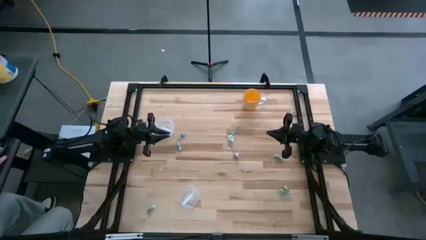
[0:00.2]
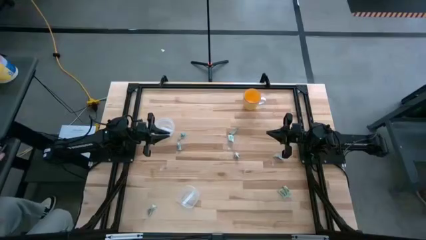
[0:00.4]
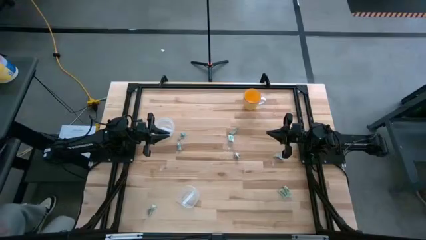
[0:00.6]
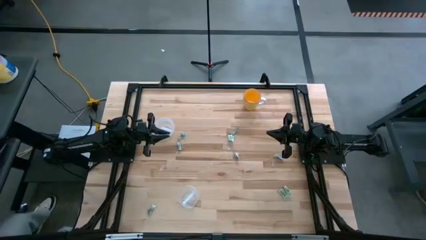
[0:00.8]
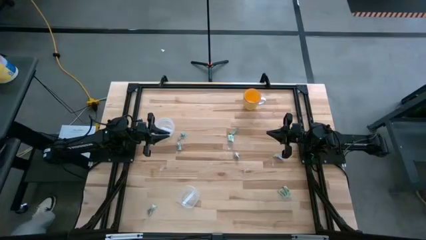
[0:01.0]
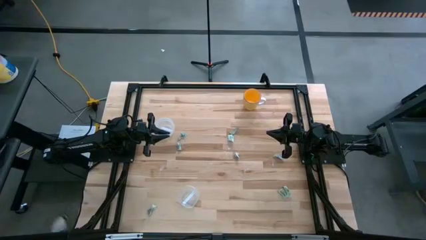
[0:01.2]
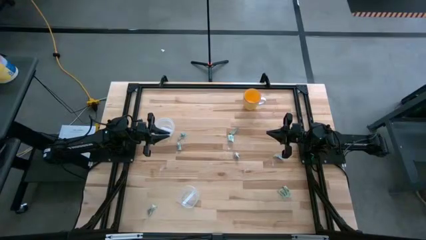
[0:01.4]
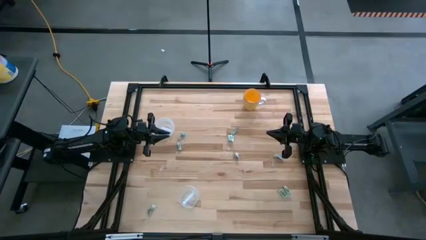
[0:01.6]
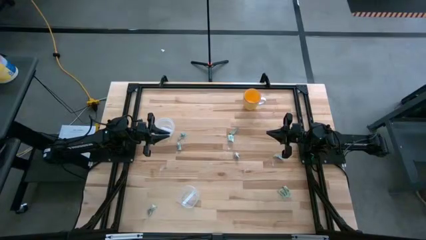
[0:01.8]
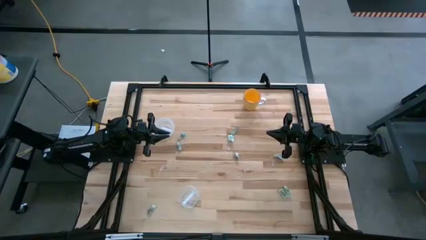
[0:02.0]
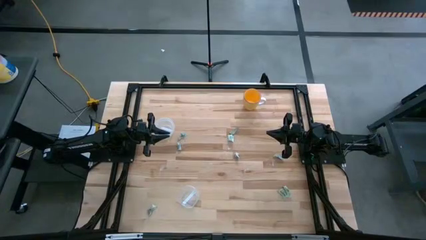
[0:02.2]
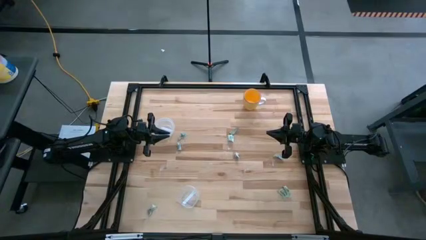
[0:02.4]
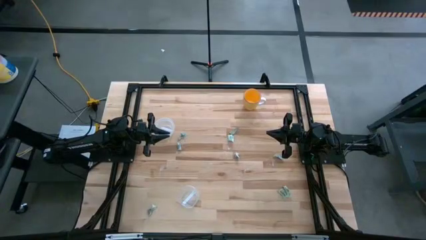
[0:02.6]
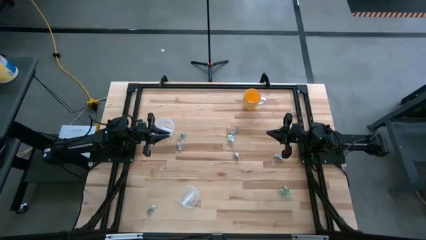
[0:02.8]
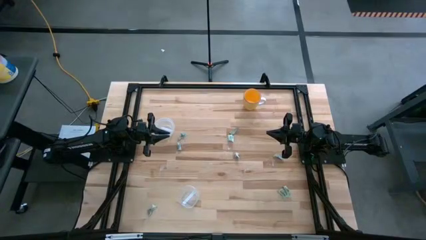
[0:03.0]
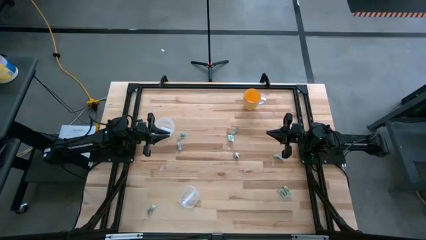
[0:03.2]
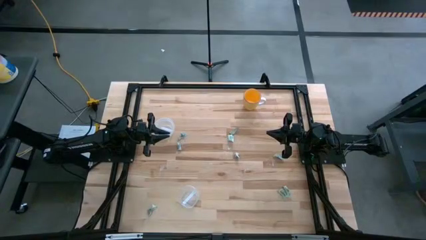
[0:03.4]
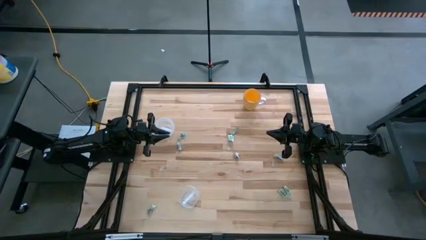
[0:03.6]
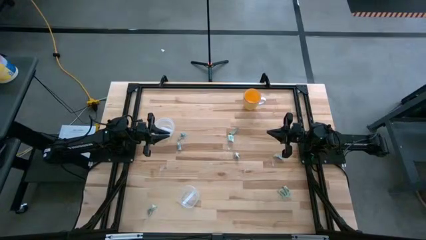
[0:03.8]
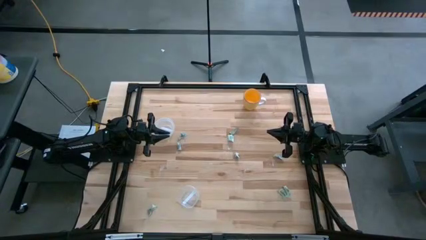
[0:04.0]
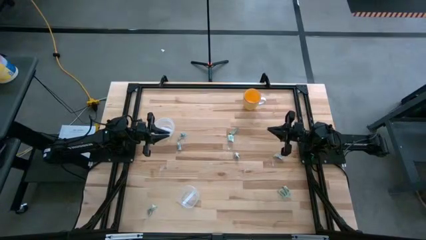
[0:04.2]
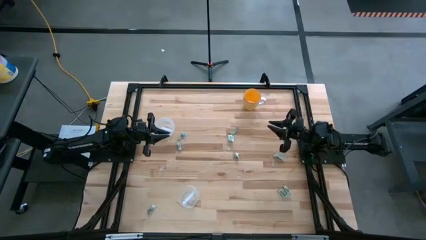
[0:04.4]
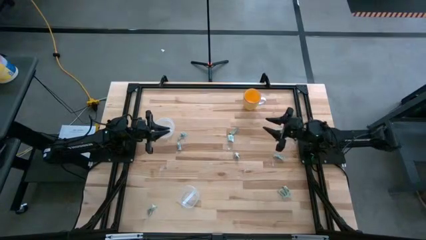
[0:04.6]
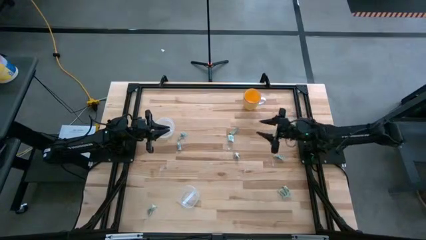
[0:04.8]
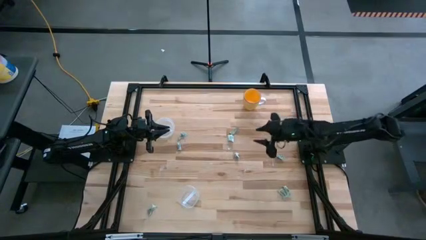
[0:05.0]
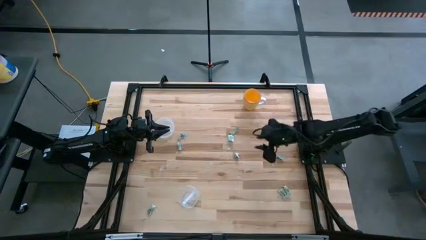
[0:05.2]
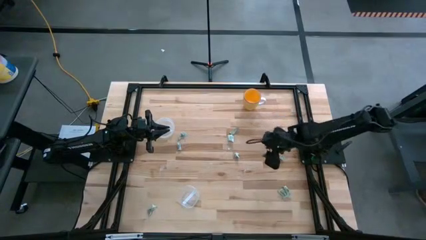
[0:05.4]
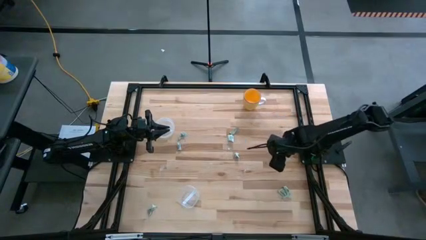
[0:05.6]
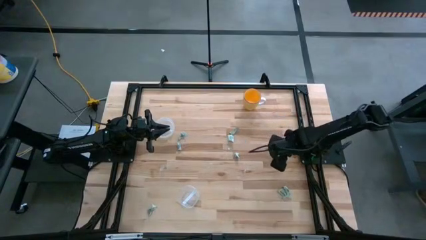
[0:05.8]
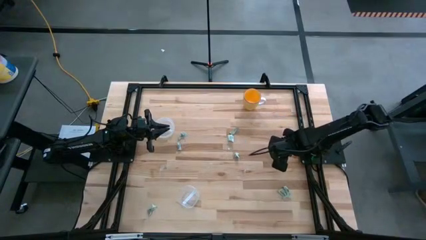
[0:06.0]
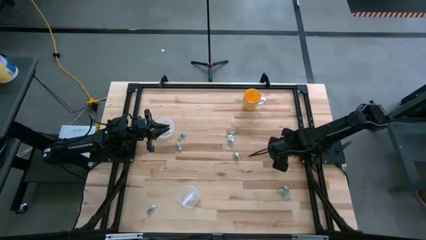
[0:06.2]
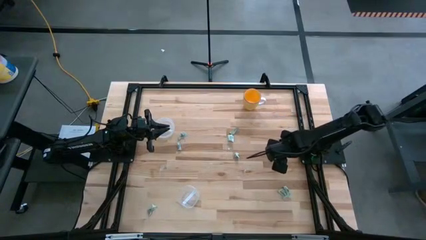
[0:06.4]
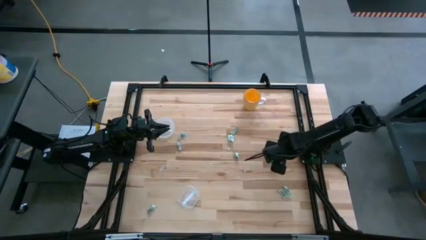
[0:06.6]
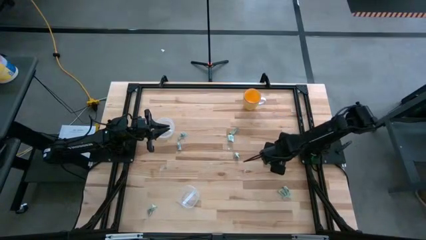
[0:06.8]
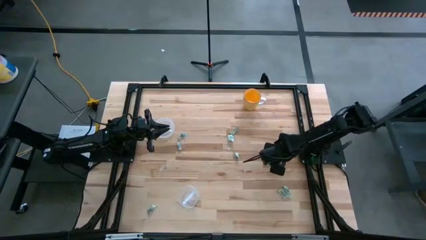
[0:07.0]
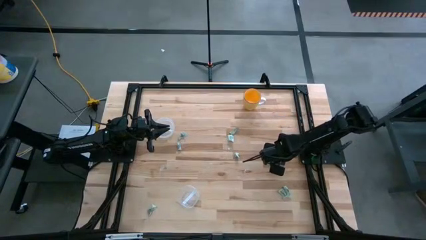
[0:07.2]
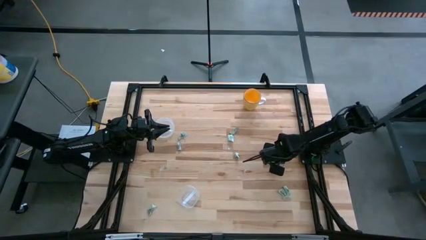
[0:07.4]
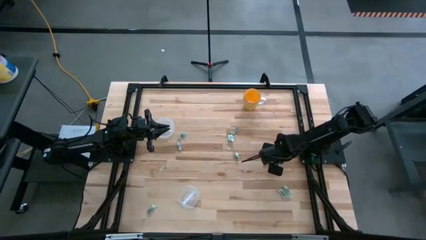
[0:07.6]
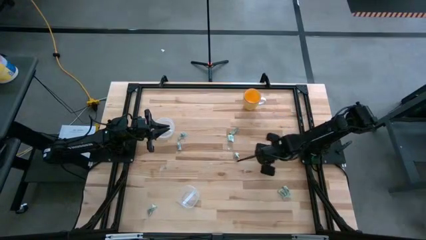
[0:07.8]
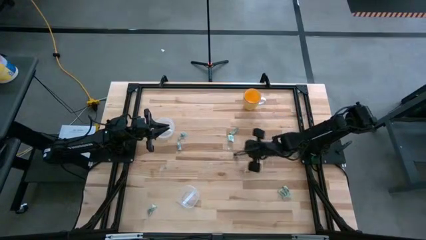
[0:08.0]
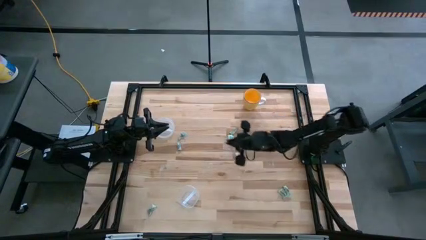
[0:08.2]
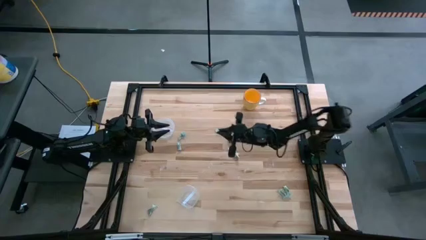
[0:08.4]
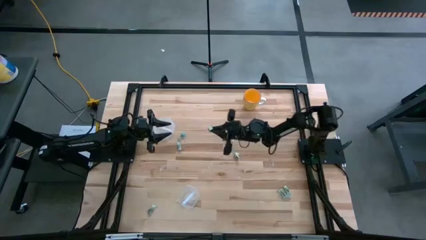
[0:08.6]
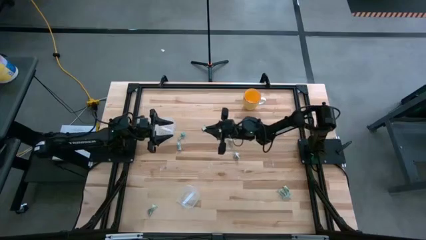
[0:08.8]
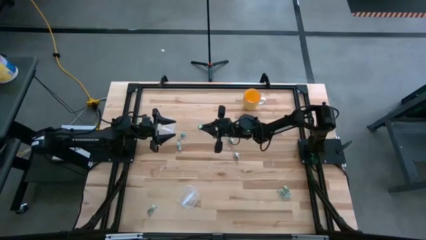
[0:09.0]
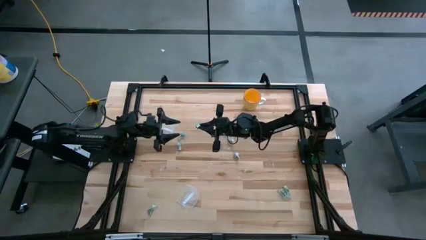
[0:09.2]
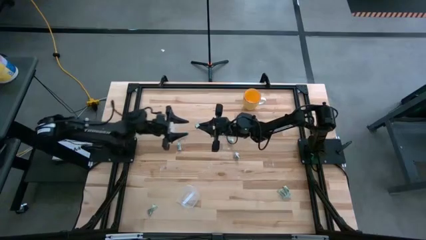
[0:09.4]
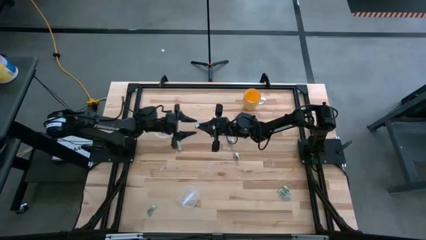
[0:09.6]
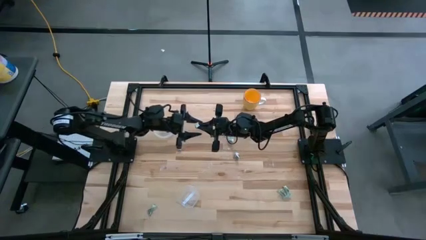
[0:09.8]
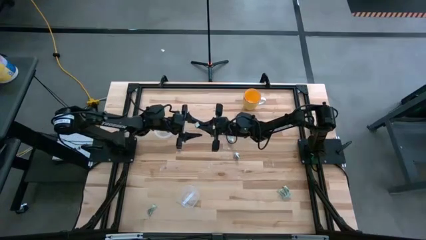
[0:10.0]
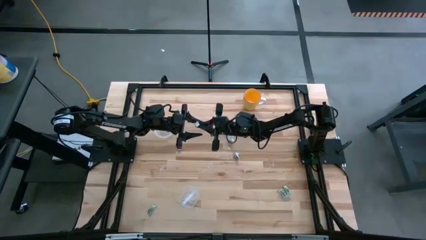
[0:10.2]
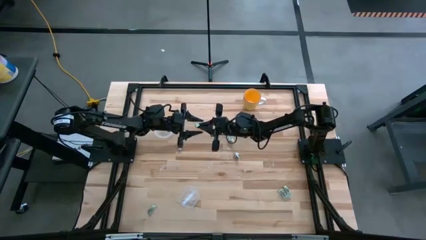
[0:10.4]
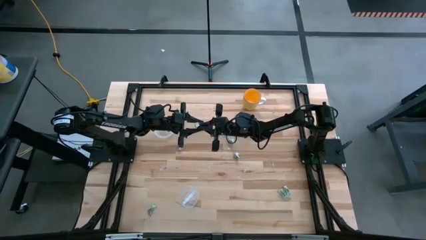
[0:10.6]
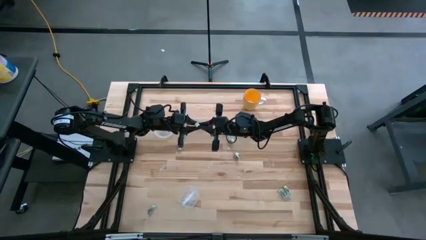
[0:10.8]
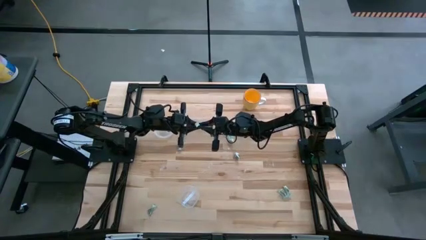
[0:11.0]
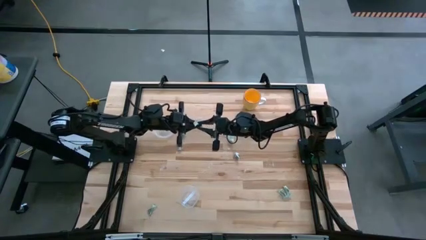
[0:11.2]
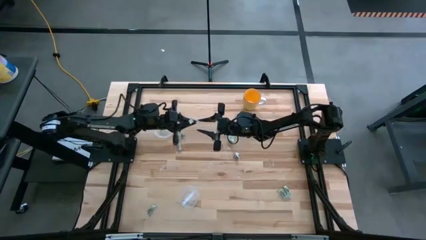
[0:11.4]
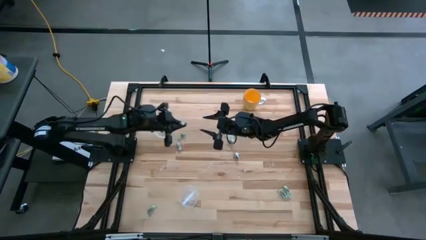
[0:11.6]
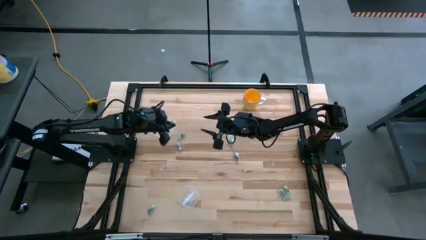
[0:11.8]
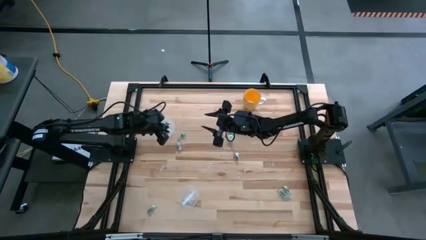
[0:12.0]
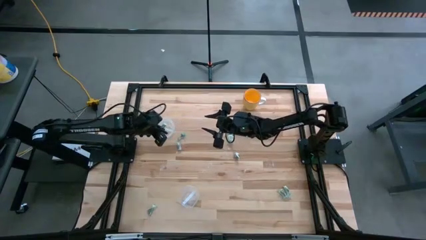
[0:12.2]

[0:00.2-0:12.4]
Task: Pick and place items into bin
Put the stevia packet into the top transparent bin

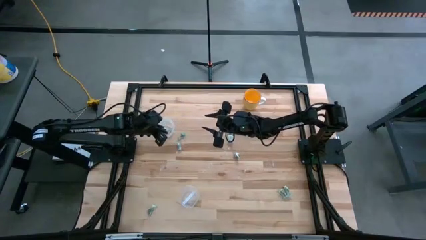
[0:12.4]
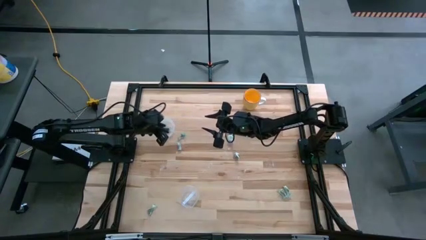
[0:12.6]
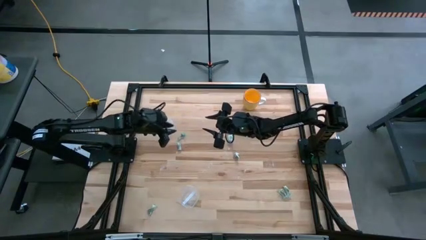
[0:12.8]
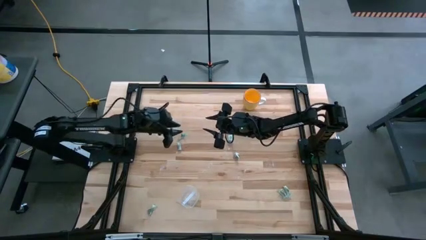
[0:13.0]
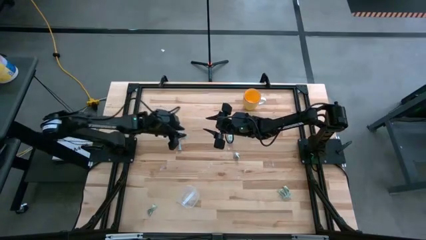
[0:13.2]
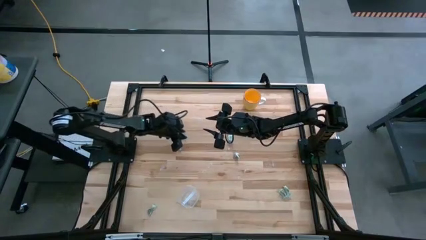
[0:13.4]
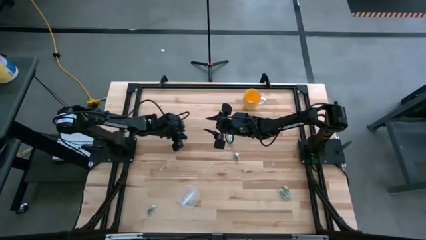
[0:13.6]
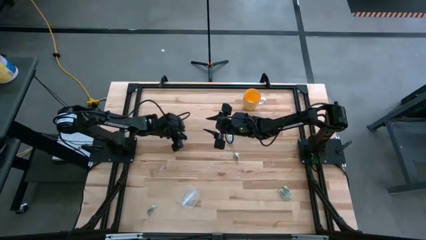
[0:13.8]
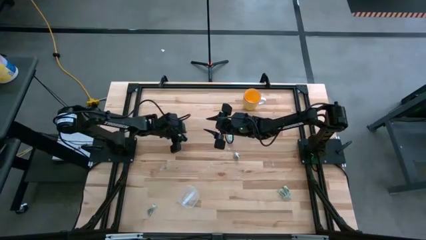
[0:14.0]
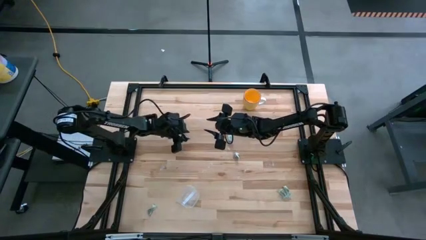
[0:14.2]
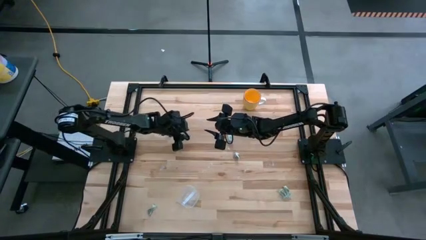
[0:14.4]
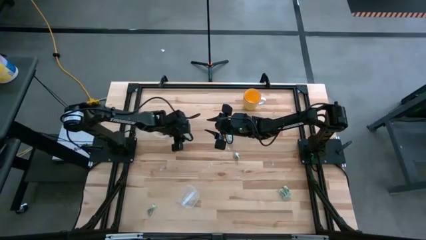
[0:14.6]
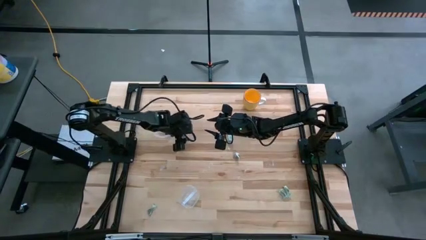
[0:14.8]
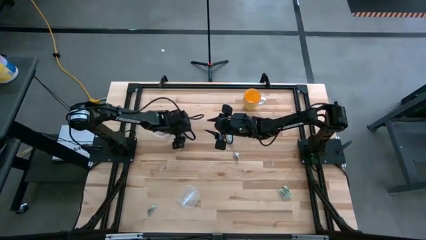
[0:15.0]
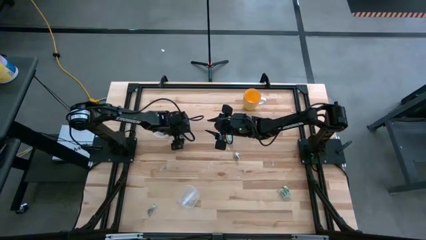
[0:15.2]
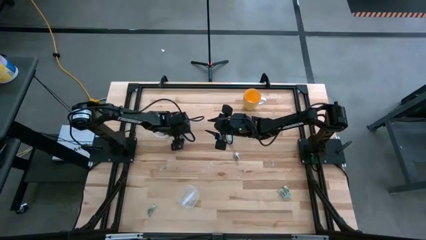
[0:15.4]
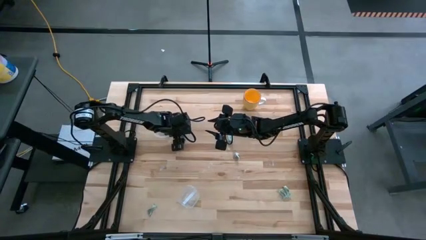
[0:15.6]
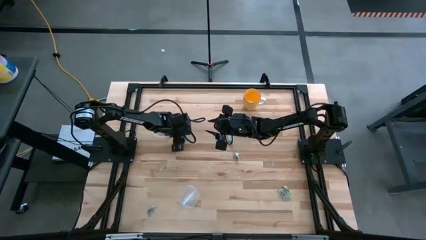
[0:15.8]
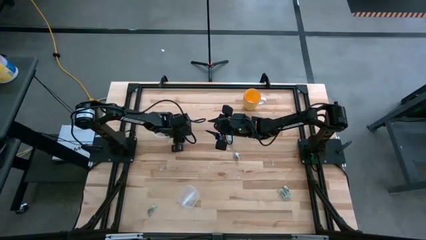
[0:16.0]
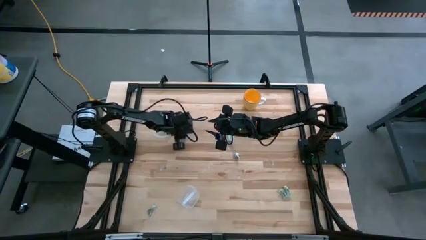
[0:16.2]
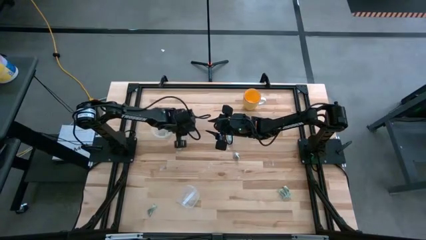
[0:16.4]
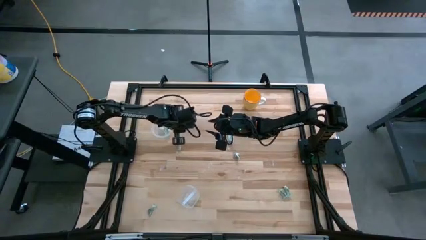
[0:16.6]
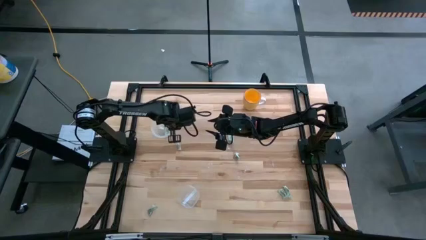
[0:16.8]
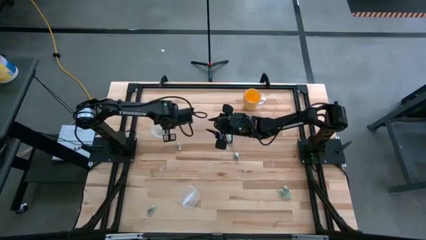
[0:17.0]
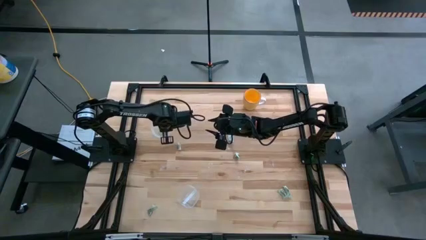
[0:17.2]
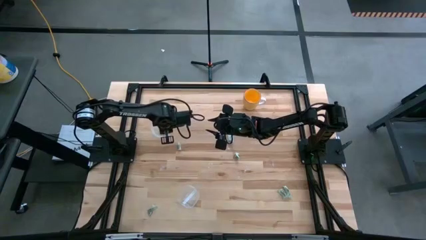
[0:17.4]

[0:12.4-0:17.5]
Put the stevia packet into the top transparent bin
